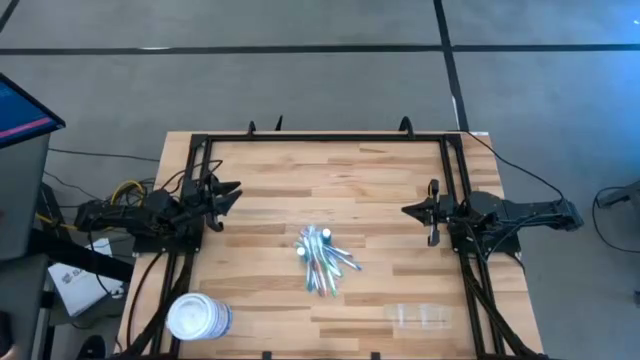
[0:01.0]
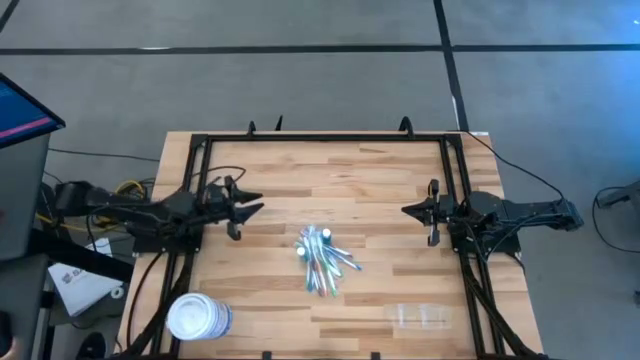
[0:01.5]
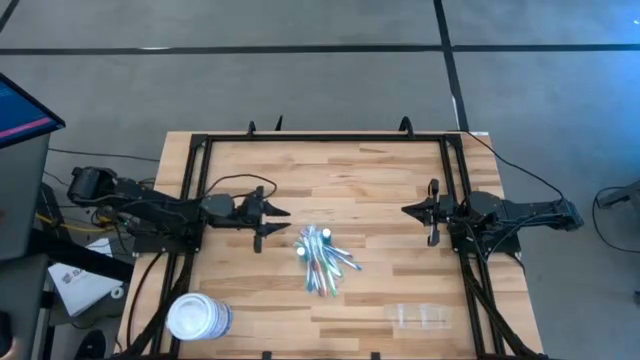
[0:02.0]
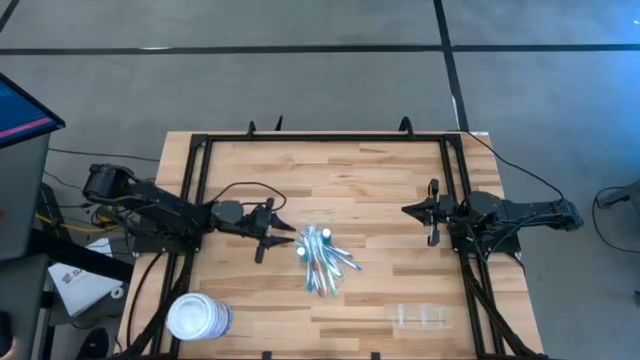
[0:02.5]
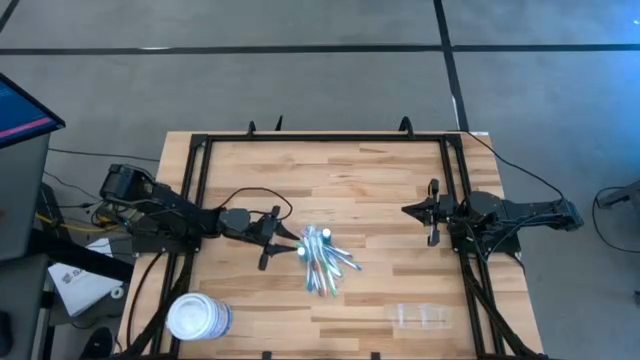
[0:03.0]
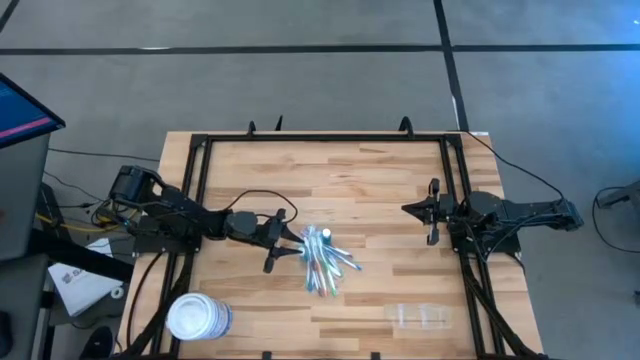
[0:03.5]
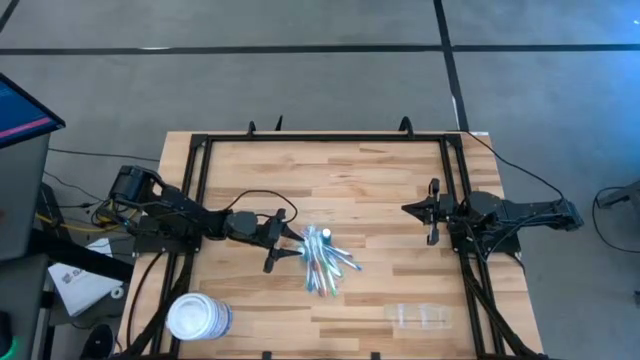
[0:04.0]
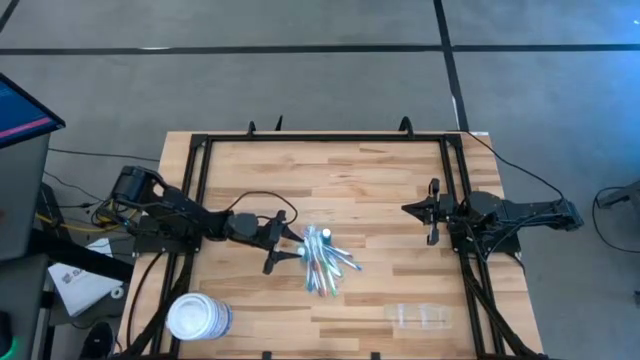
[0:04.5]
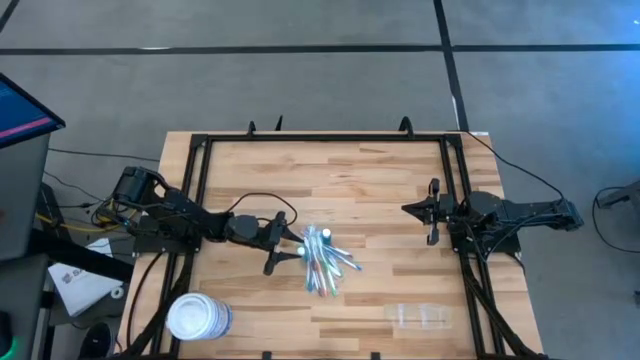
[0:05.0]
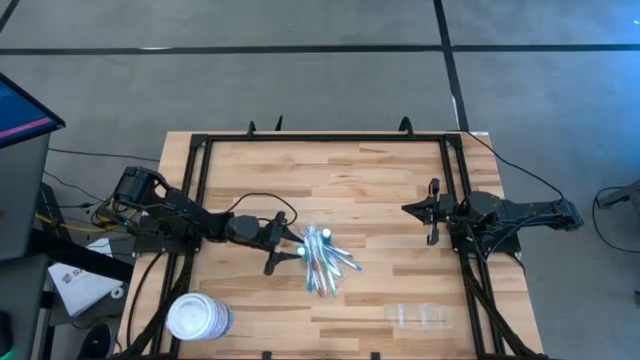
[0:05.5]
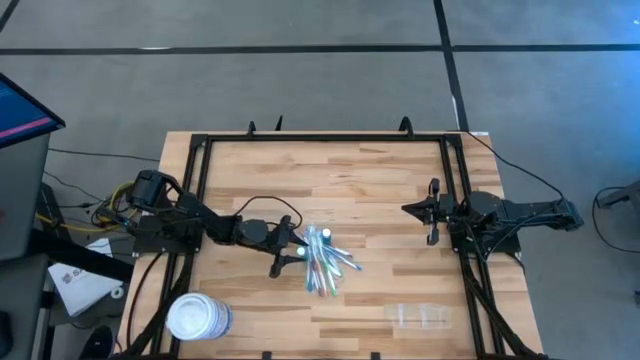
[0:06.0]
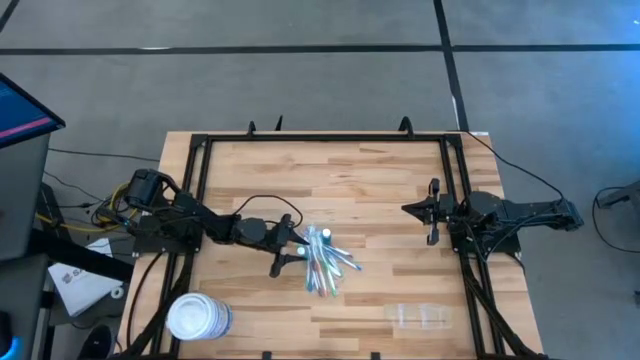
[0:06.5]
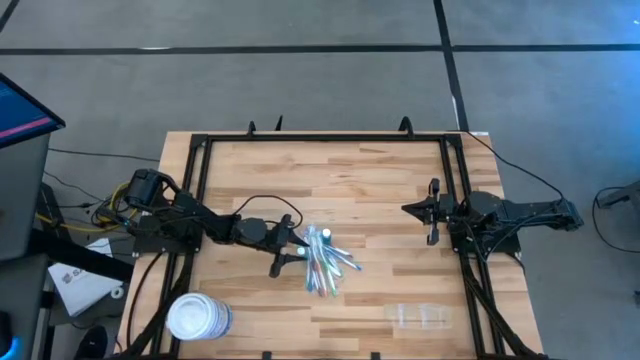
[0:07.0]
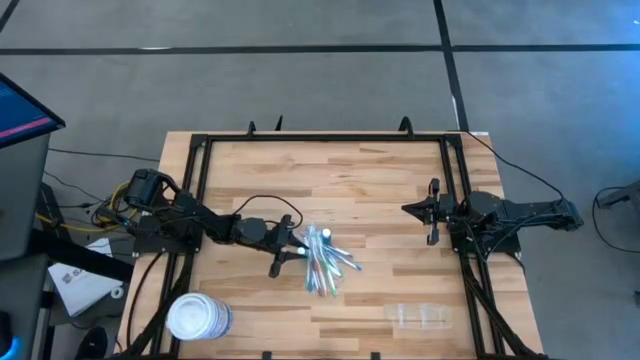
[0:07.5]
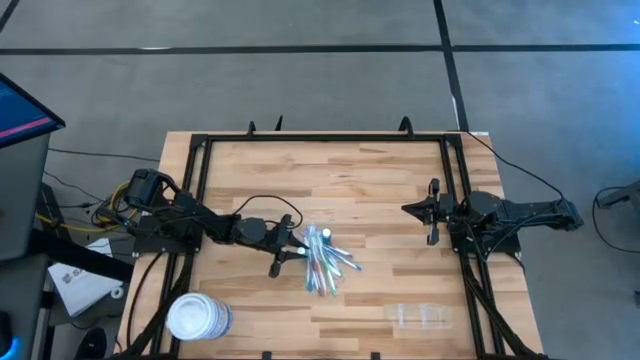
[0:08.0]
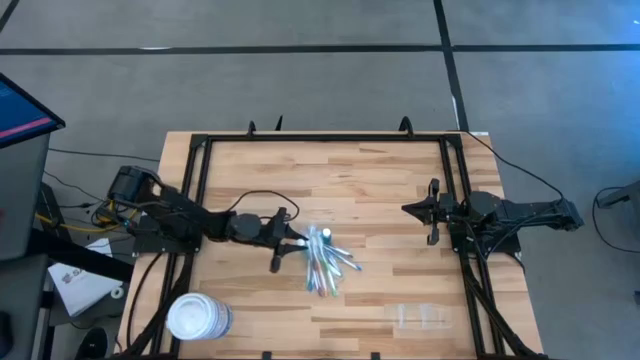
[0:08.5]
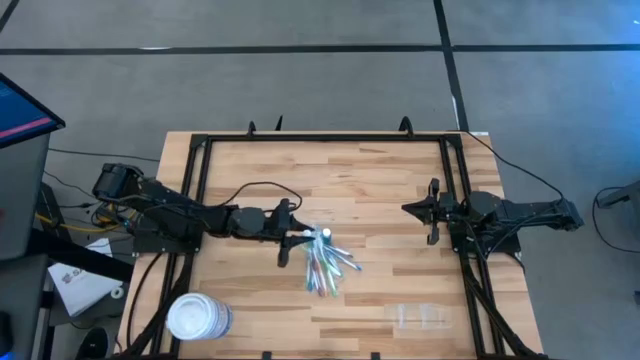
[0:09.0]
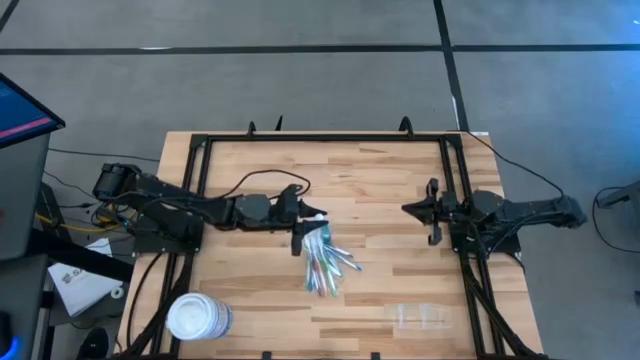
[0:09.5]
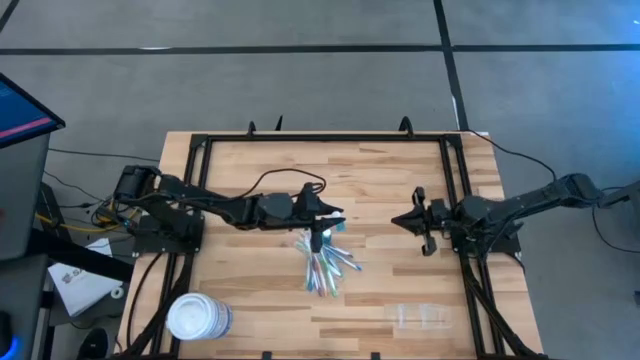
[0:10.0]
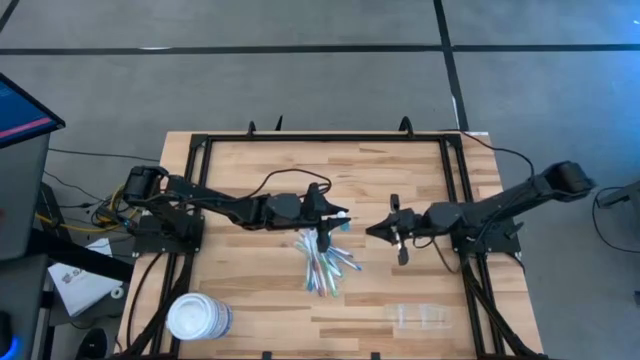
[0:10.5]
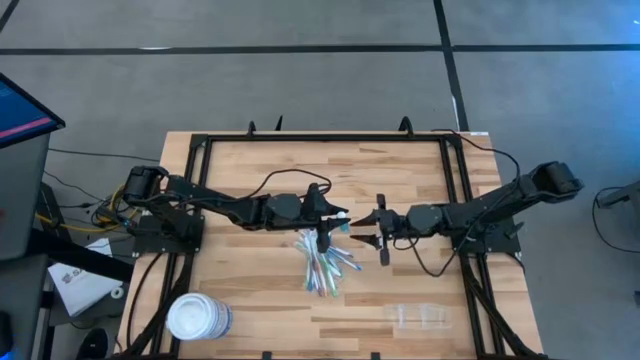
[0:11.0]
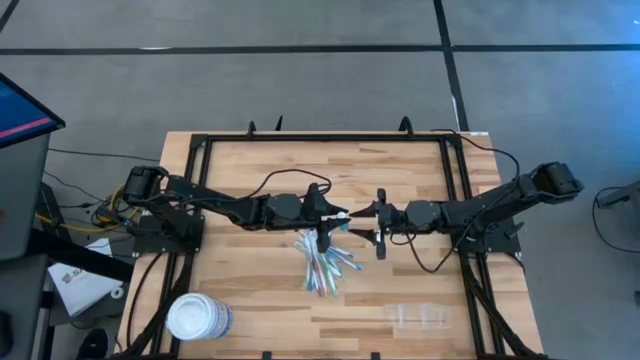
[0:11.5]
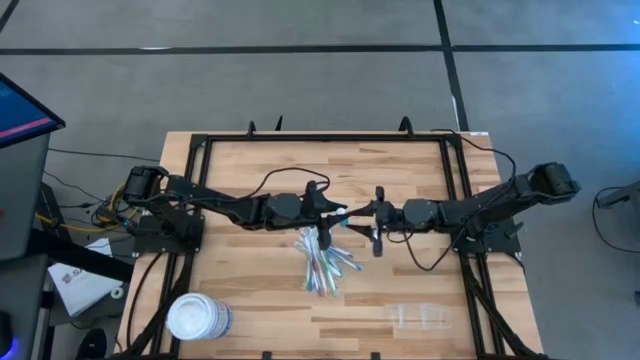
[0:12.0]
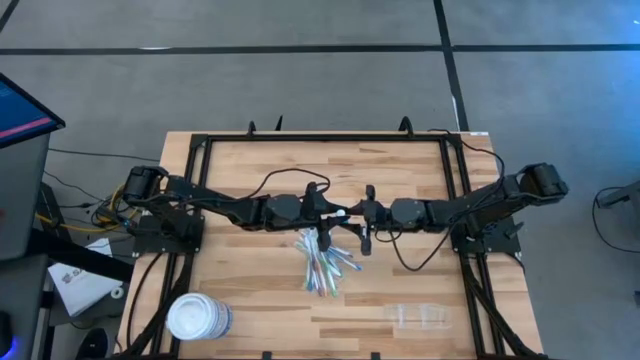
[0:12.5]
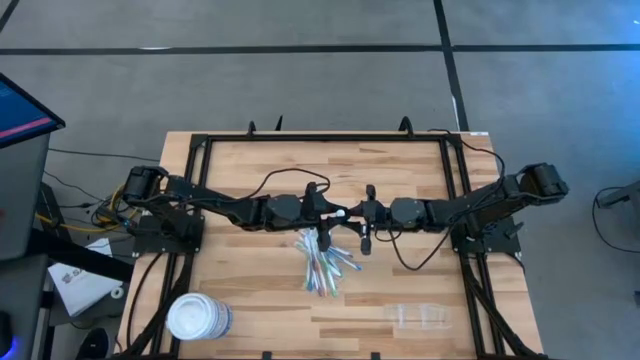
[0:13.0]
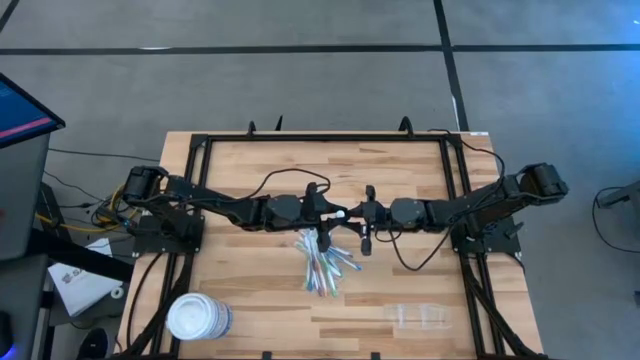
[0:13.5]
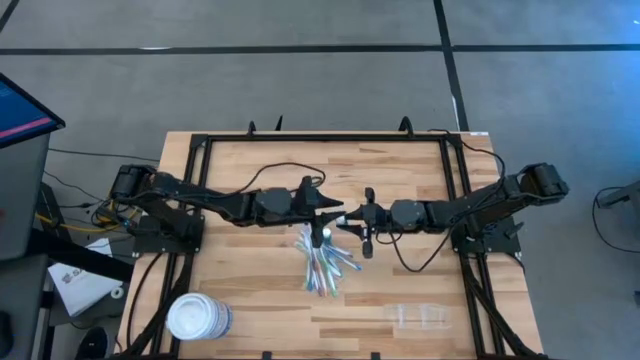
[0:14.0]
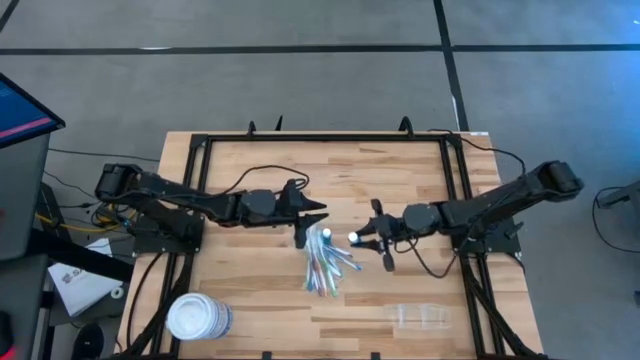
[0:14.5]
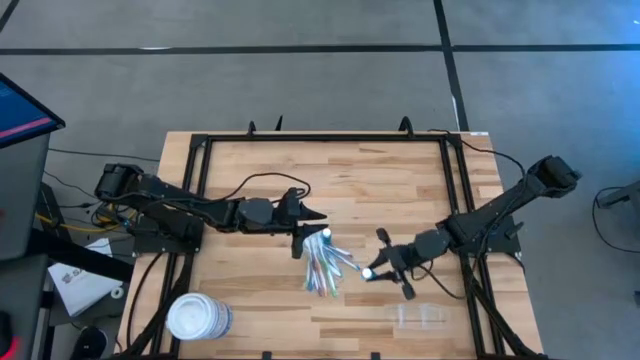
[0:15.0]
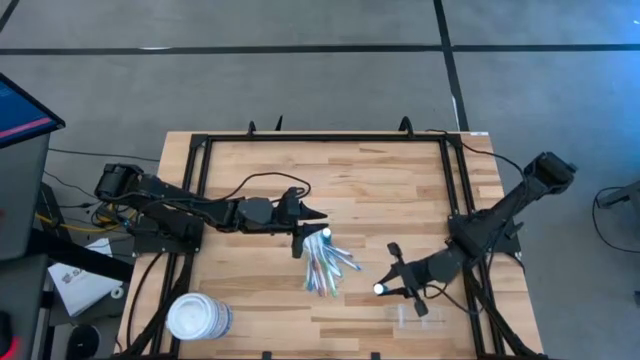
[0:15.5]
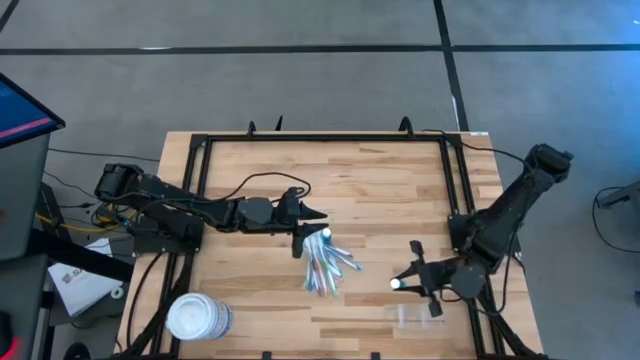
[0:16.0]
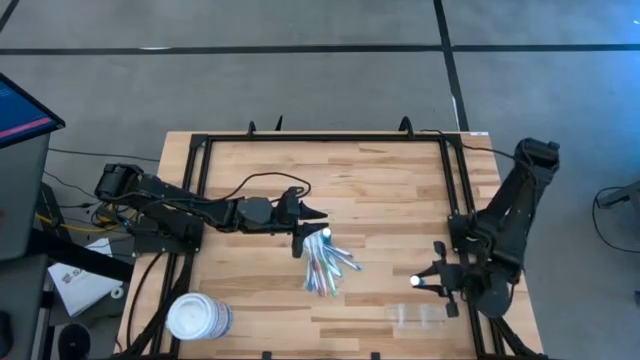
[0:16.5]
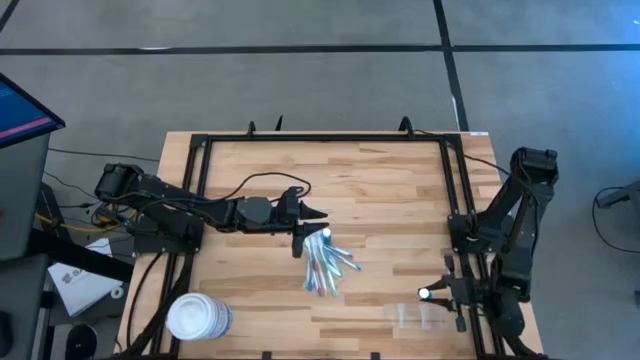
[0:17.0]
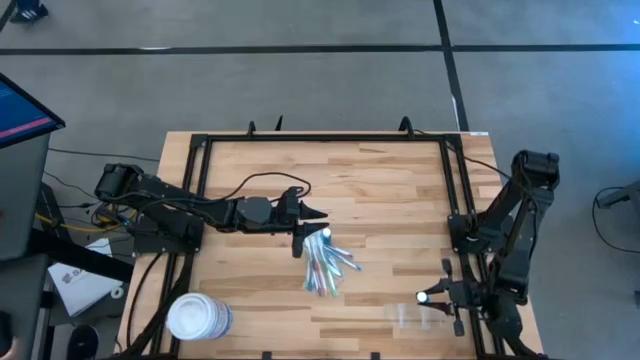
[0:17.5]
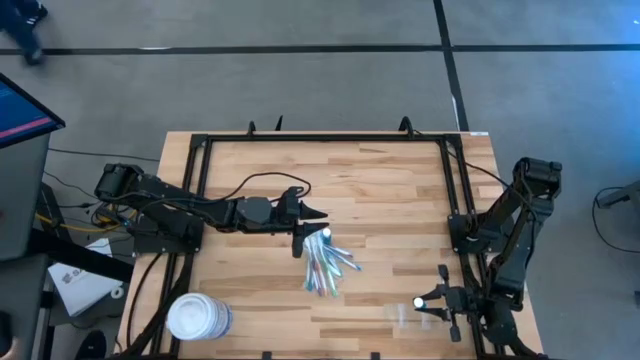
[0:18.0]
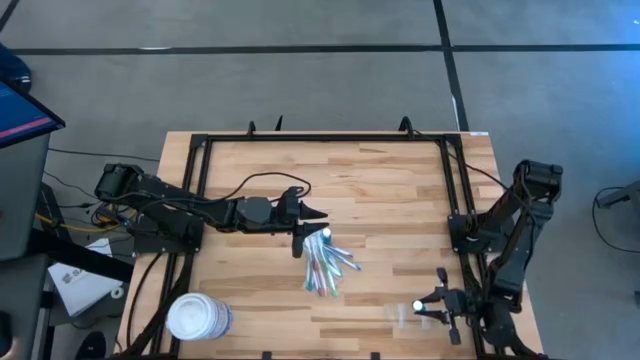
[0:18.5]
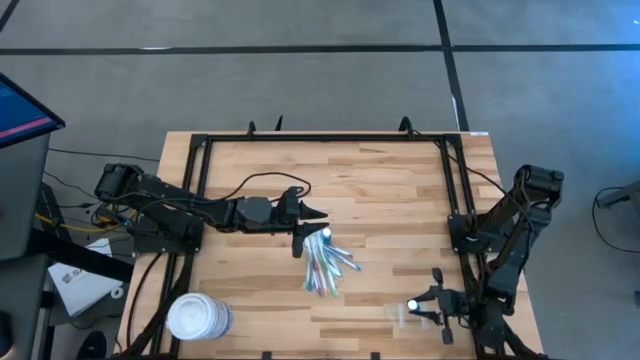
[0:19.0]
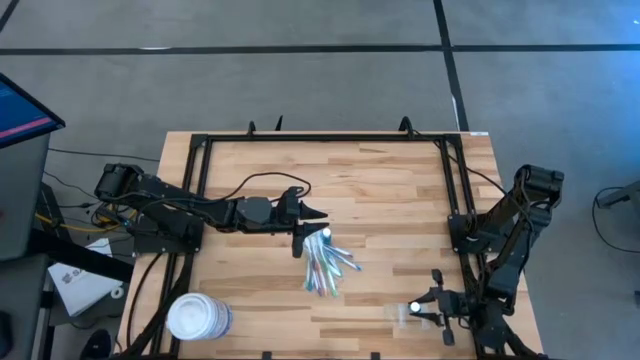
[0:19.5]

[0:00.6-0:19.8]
Task: Pick & Place toothbrushing station
Put the blue mouthwash into the transparent organizer
